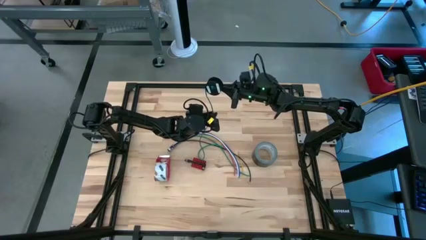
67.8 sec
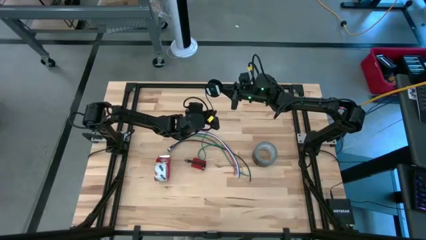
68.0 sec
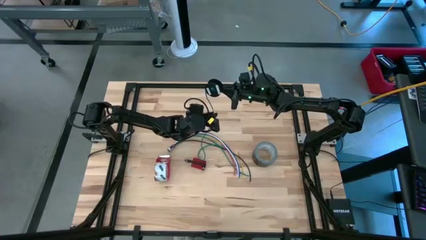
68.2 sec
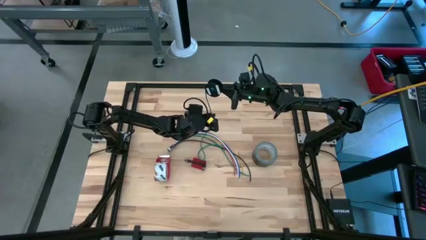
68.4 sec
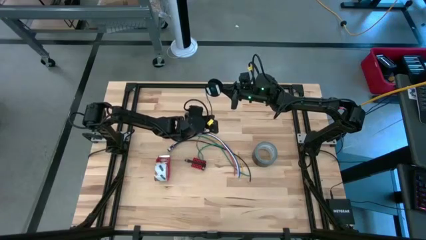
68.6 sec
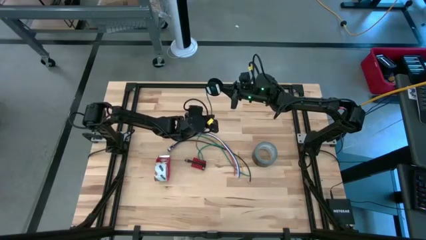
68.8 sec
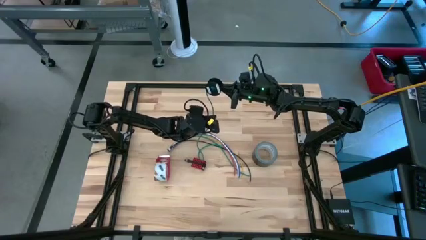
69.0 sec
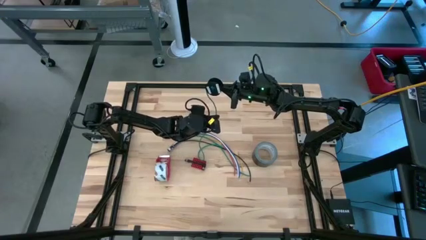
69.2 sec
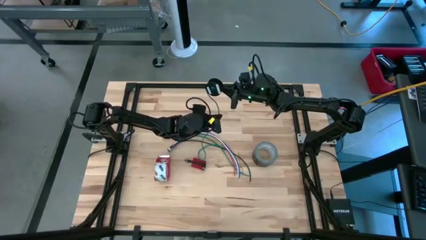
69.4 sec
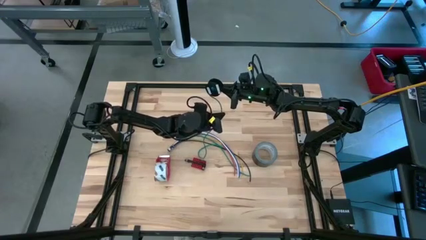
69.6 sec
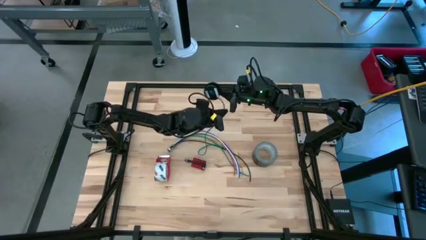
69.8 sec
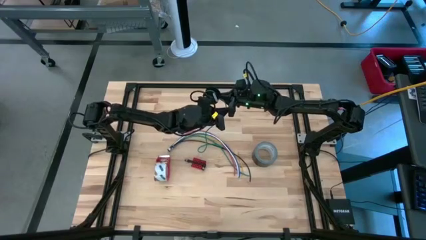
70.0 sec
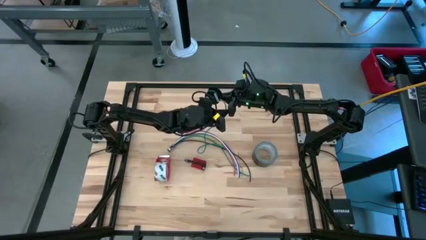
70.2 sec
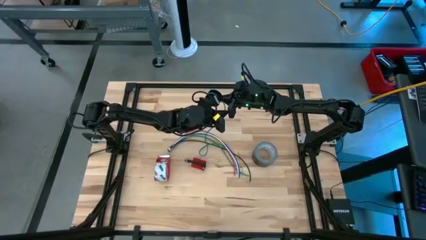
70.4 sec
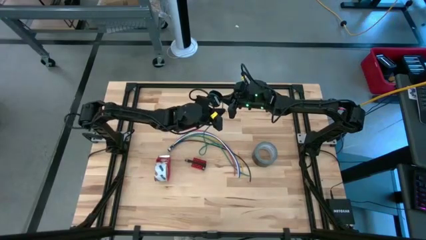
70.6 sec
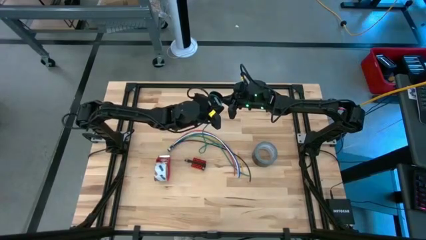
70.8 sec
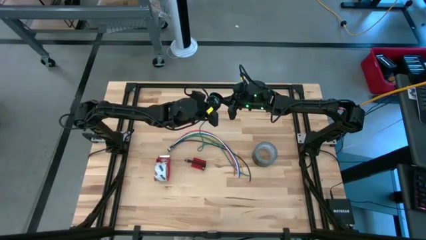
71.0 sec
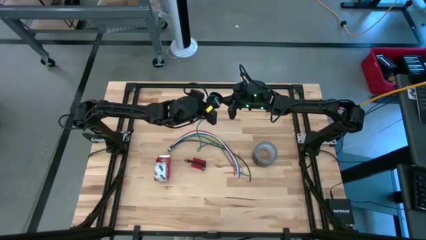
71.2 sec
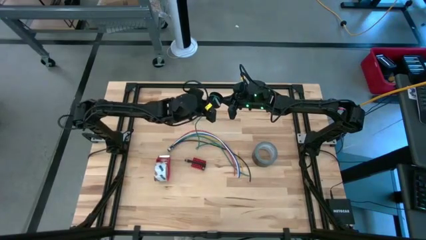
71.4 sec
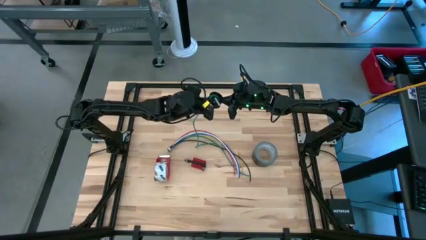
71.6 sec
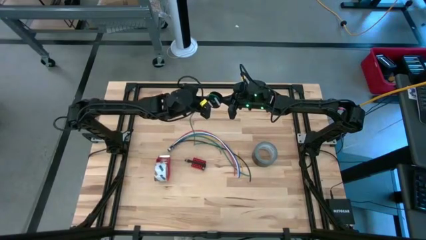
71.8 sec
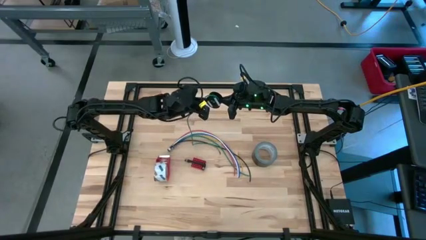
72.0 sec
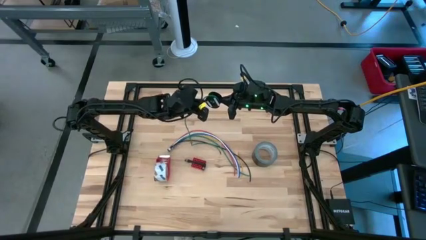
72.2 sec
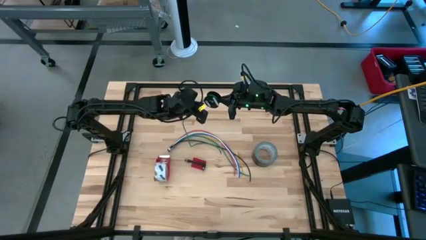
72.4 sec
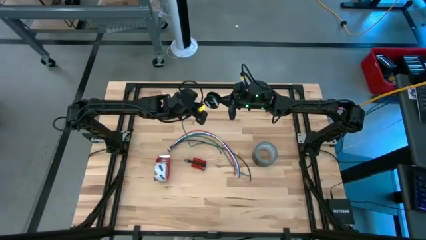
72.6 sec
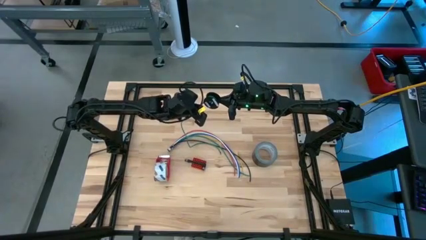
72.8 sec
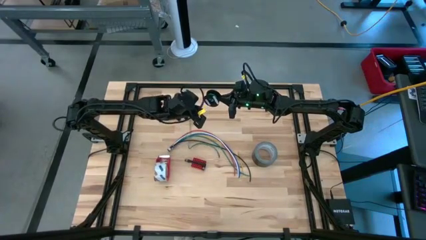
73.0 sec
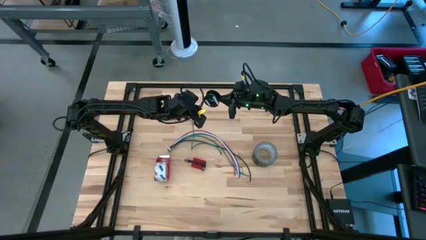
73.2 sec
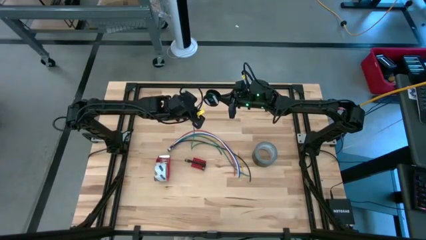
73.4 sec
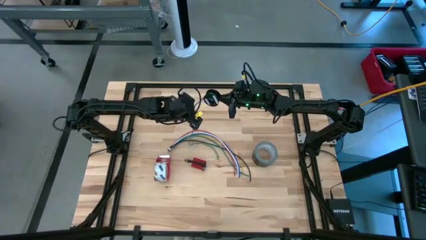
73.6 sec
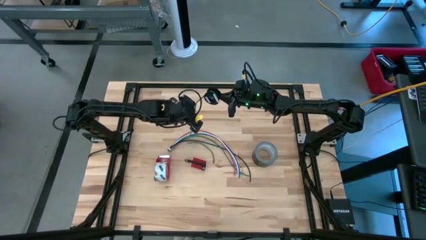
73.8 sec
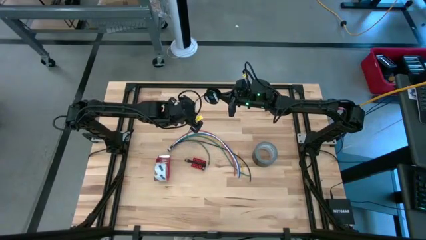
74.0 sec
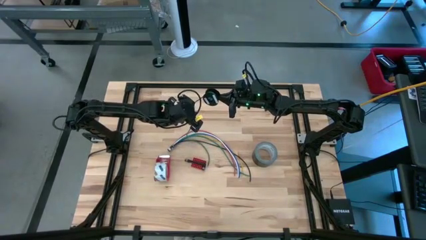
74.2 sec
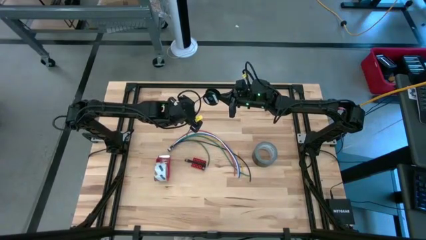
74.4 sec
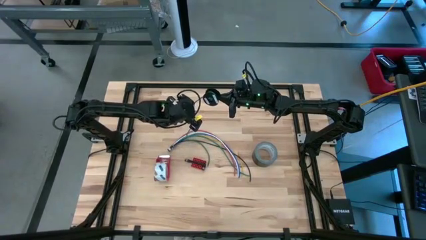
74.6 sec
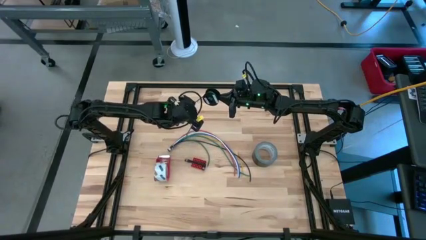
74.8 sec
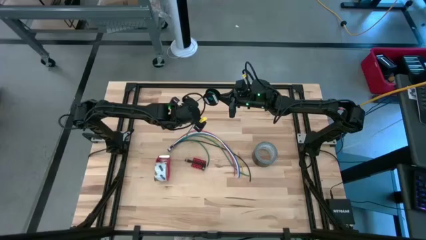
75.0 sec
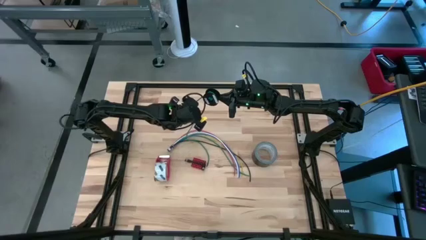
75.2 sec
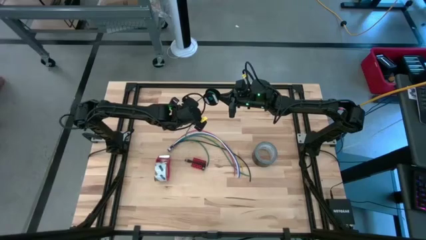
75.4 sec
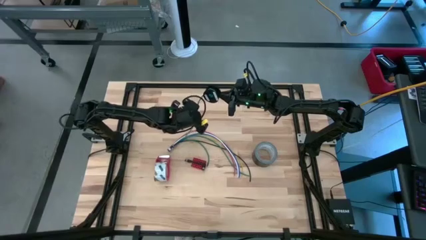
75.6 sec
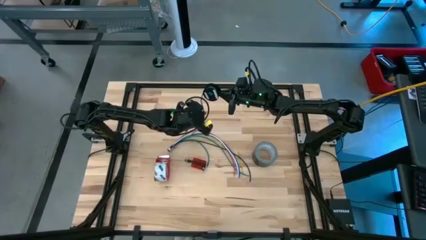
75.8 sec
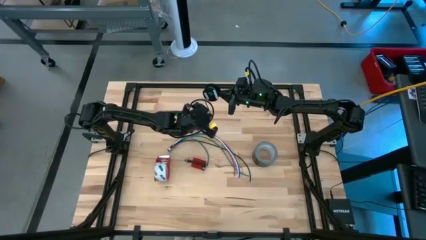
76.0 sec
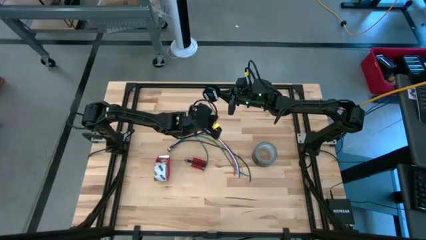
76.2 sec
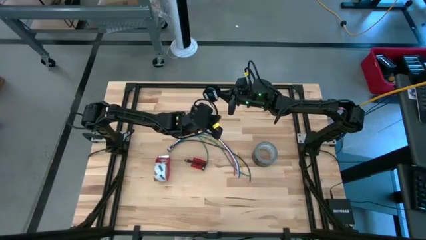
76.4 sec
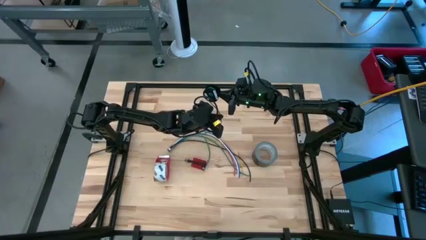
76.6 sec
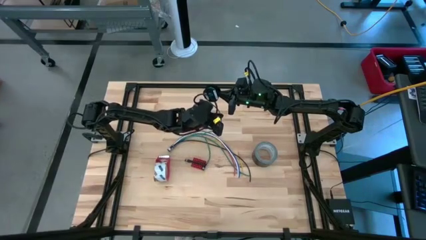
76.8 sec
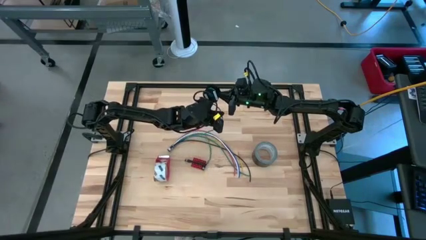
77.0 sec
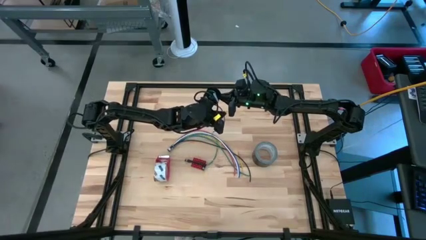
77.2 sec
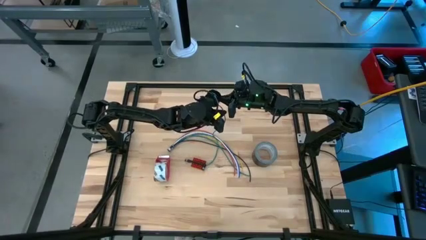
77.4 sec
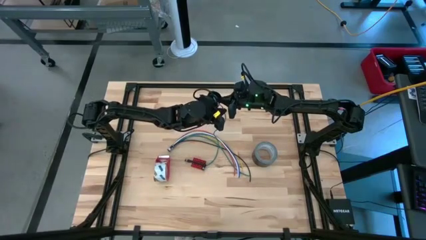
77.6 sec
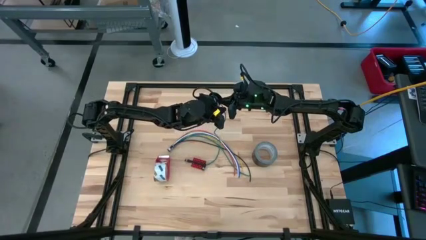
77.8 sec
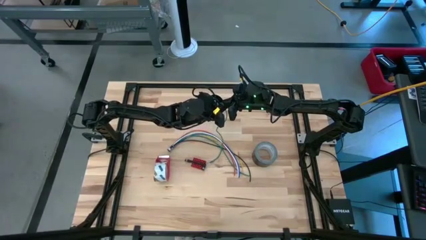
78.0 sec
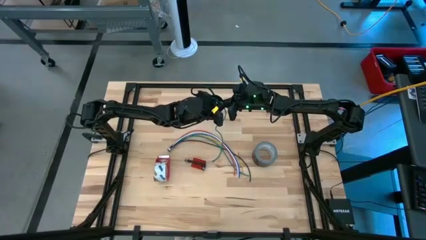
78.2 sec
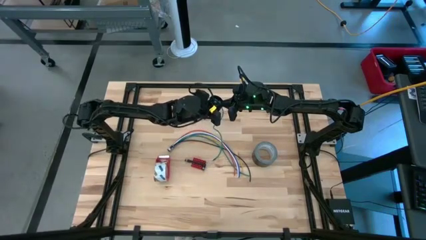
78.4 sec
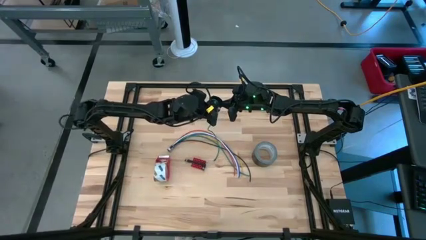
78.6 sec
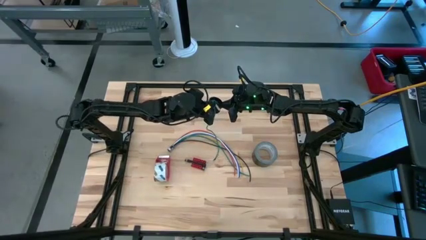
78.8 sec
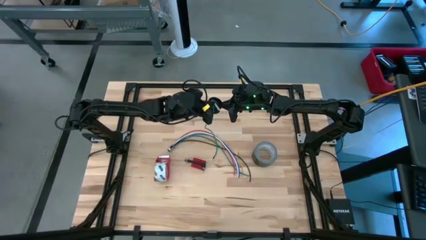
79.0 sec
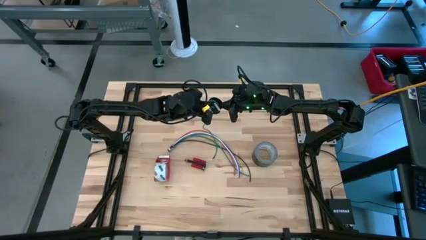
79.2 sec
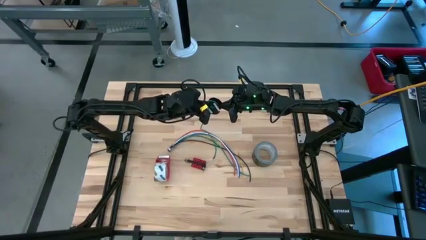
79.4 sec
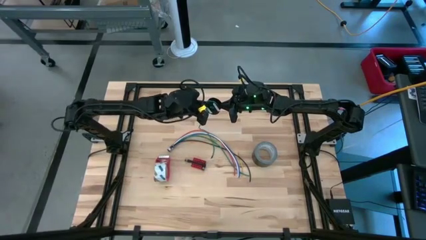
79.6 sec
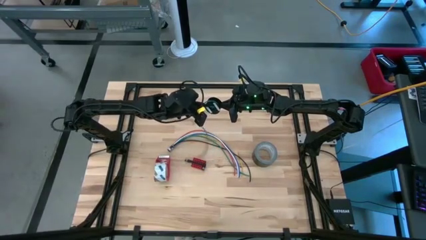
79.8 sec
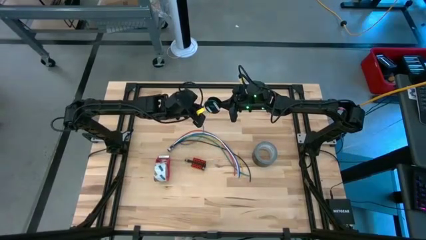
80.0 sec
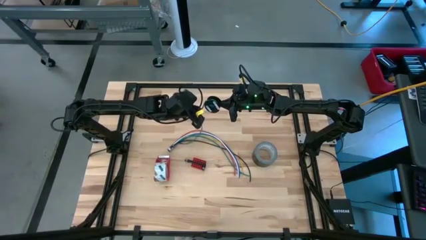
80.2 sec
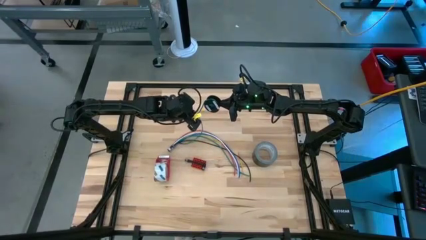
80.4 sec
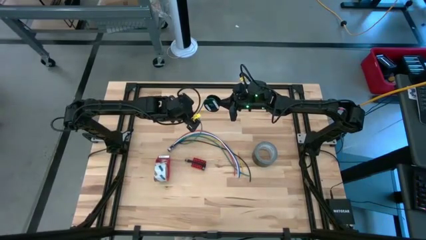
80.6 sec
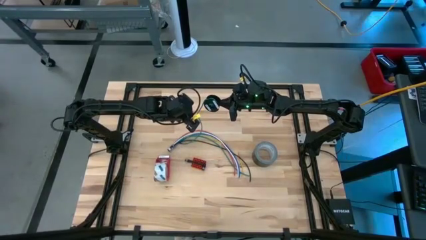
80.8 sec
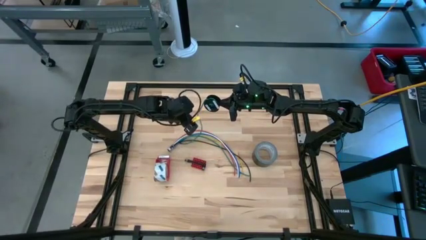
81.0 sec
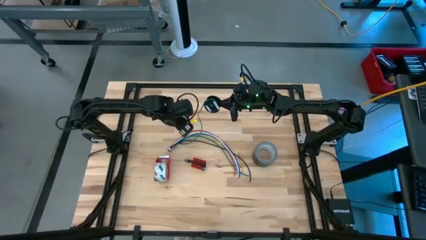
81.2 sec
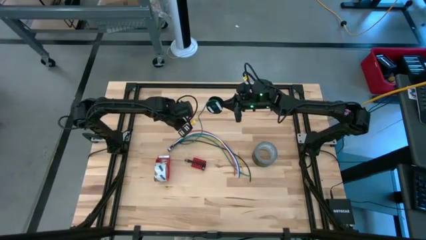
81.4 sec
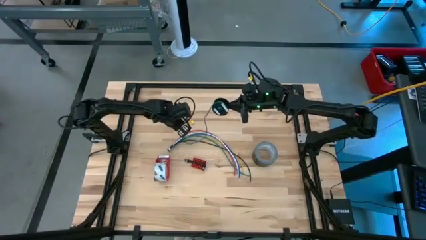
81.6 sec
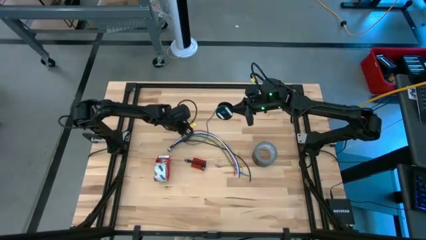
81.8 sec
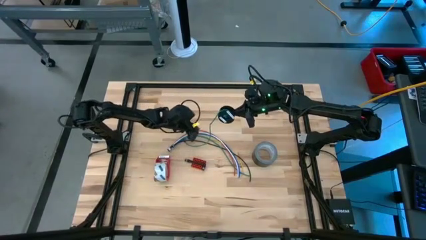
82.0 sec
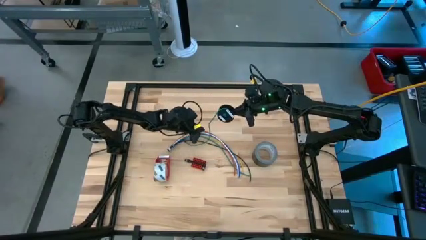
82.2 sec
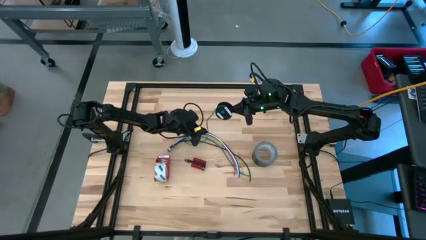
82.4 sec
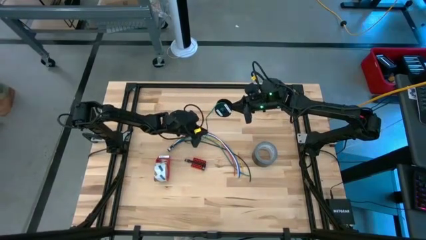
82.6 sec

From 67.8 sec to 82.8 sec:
Task: Coil cords
Coil the green wire onto the black spool
